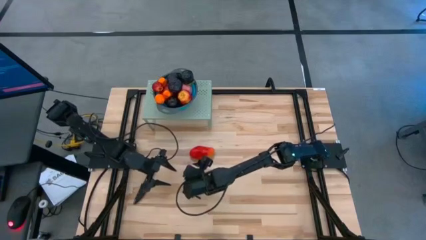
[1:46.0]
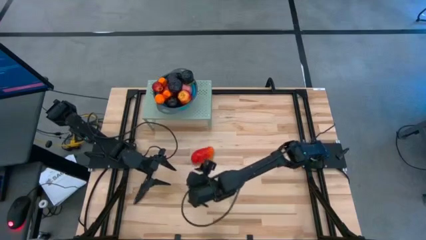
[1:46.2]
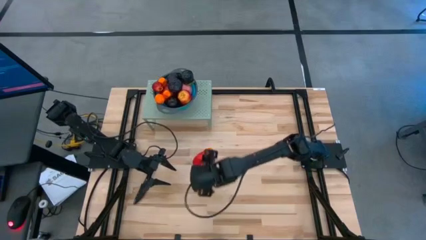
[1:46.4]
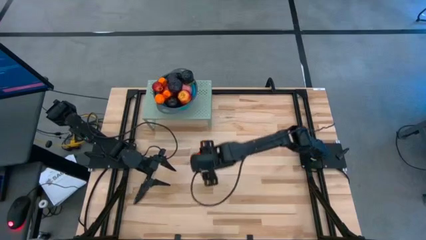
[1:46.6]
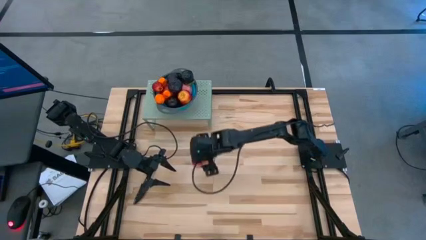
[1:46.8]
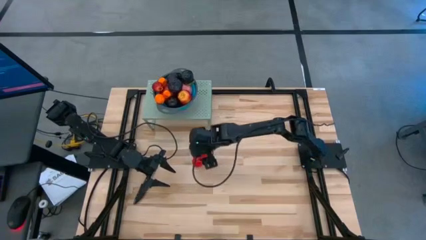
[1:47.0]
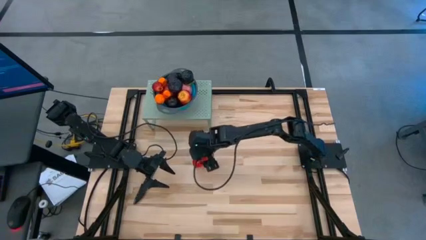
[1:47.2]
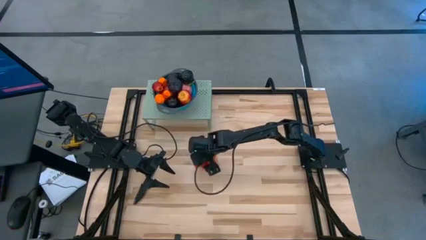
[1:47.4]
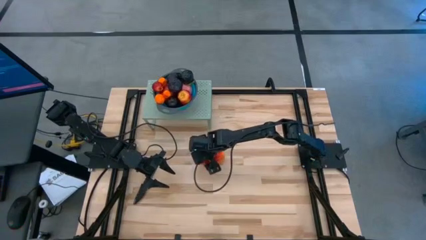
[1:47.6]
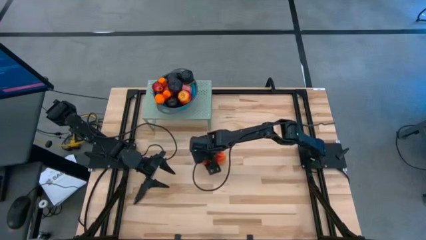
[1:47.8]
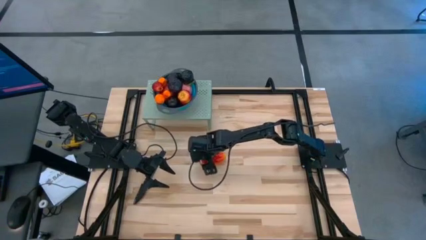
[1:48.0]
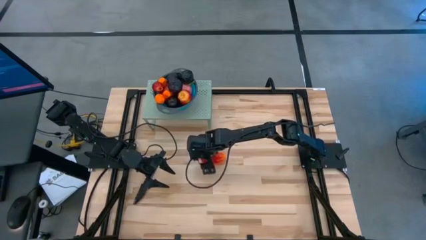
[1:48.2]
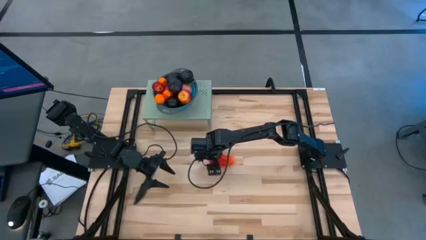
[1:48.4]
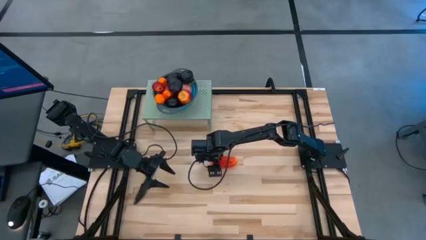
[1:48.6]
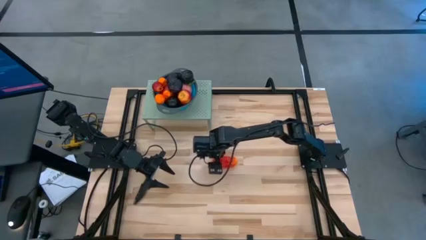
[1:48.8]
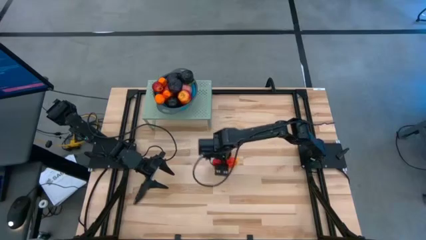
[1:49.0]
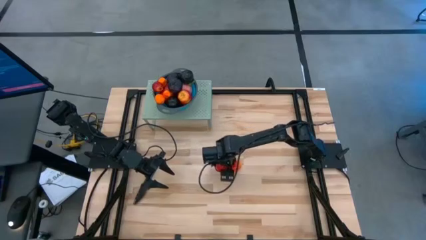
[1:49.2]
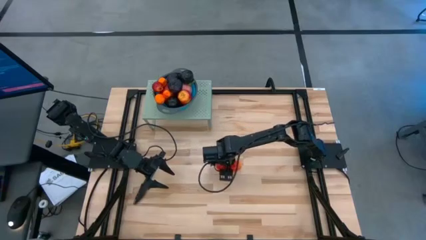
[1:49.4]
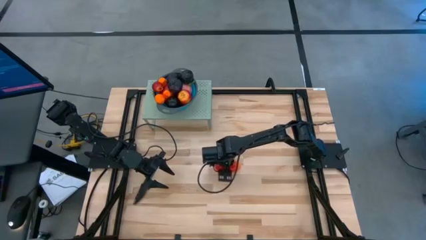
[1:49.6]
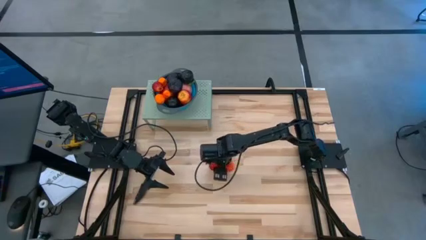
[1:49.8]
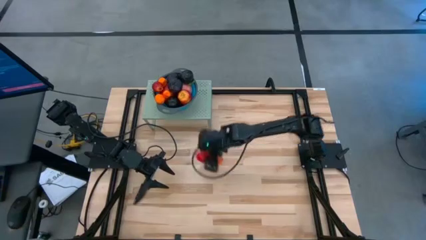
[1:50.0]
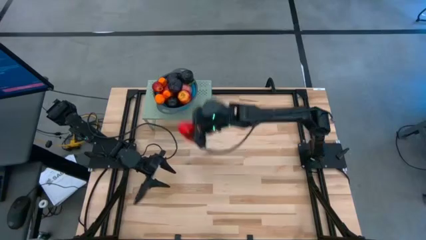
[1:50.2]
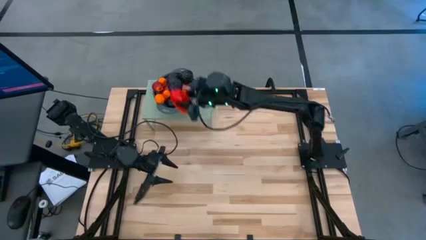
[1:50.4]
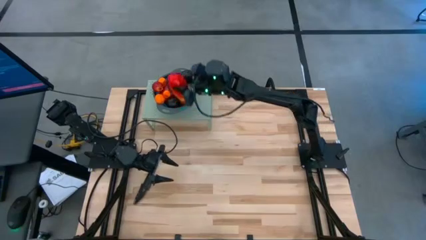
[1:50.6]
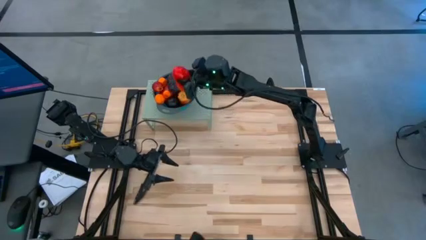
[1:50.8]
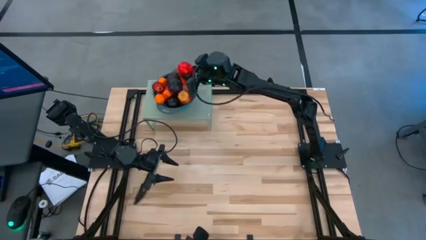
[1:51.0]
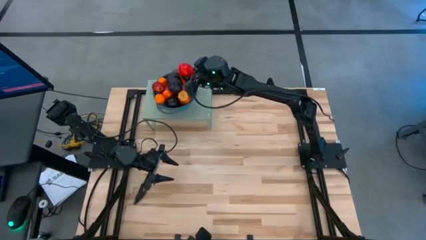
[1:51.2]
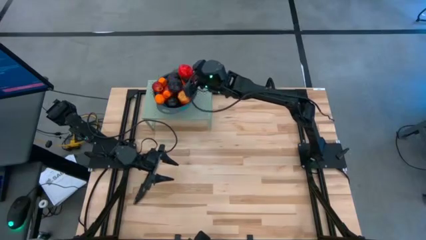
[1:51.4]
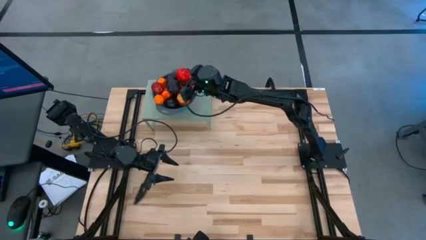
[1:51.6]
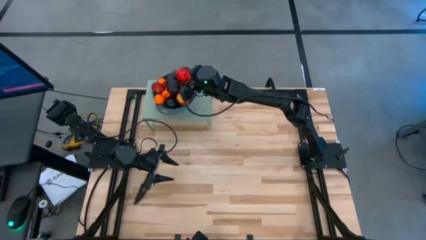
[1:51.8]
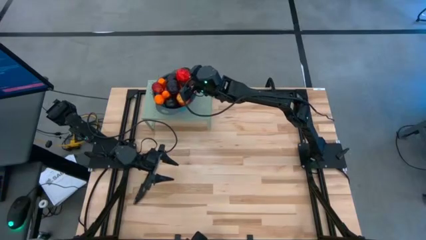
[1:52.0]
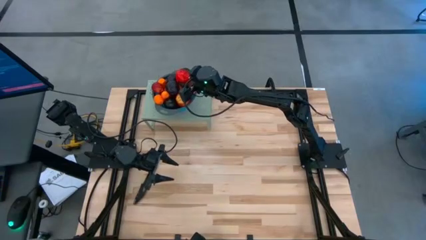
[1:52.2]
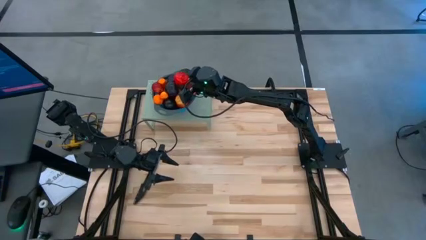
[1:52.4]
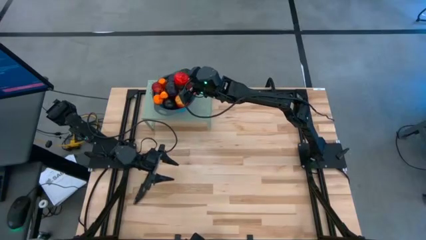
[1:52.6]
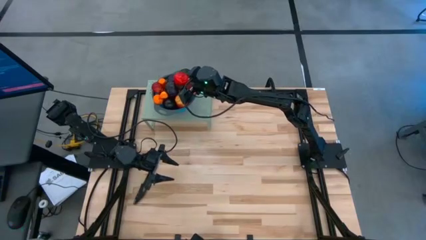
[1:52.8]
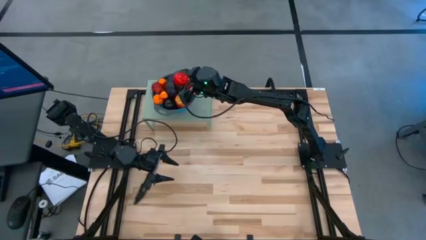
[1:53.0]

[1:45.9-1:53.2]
Task: Pick & Place Fruit
Put the orange mango into the blue strainer bowl on the shelf

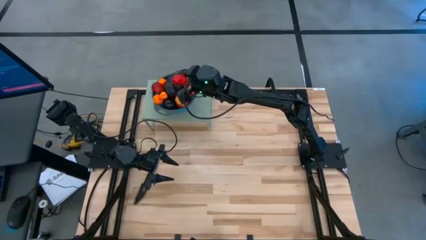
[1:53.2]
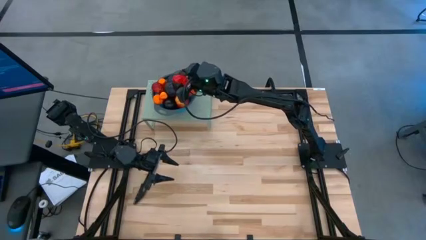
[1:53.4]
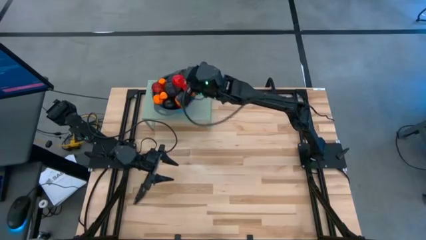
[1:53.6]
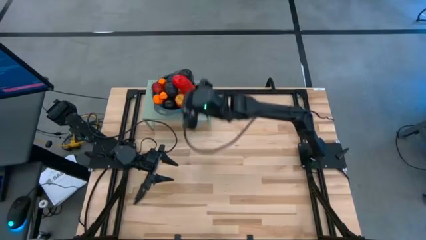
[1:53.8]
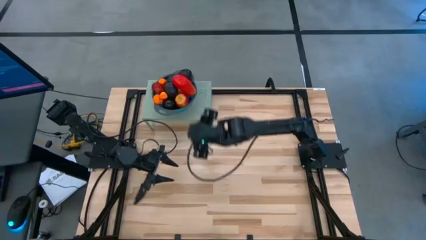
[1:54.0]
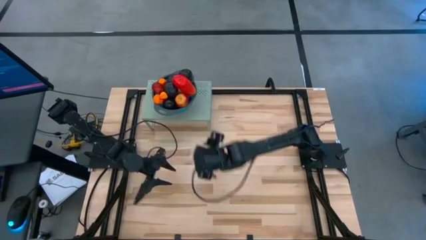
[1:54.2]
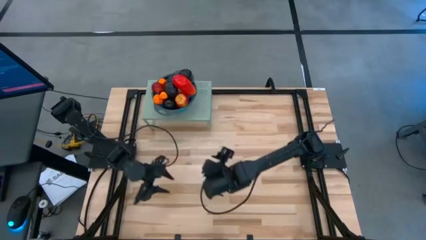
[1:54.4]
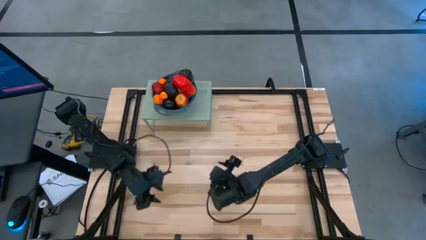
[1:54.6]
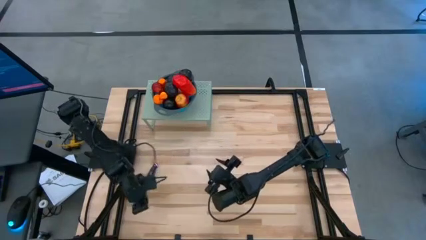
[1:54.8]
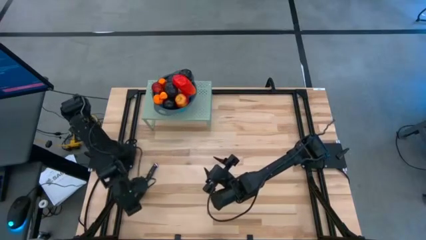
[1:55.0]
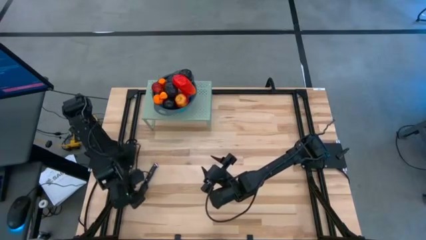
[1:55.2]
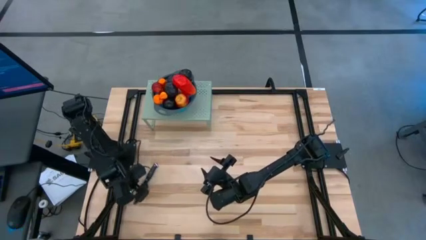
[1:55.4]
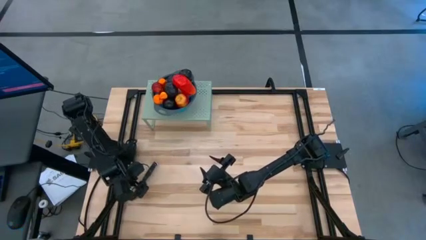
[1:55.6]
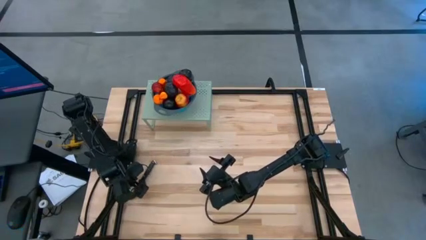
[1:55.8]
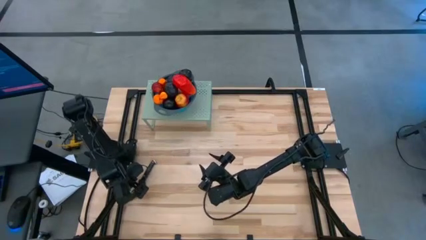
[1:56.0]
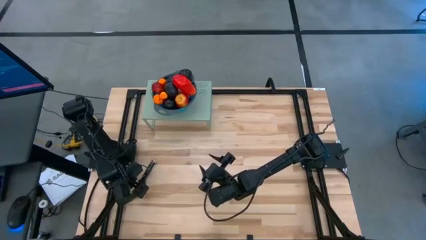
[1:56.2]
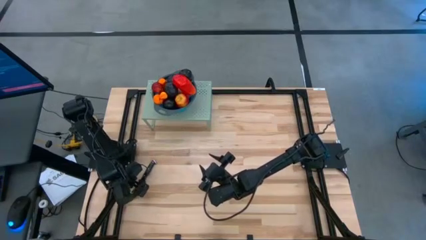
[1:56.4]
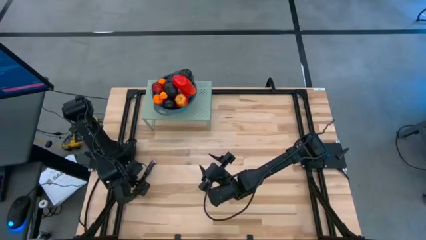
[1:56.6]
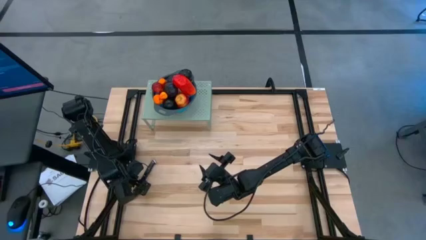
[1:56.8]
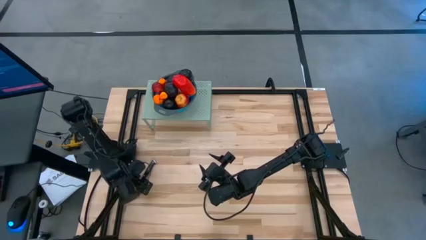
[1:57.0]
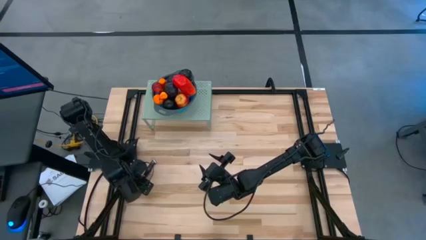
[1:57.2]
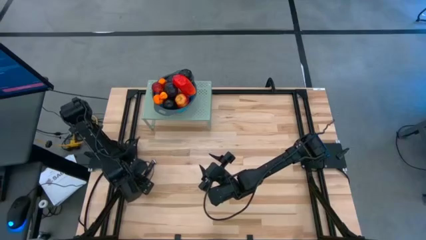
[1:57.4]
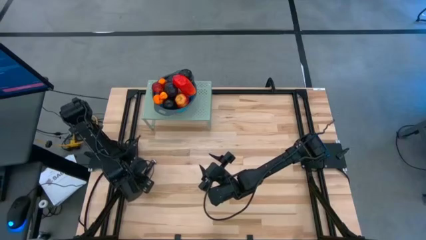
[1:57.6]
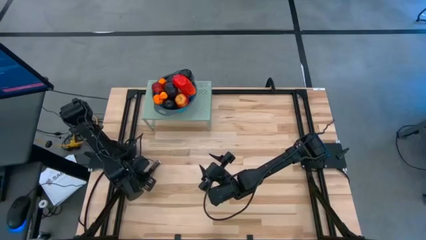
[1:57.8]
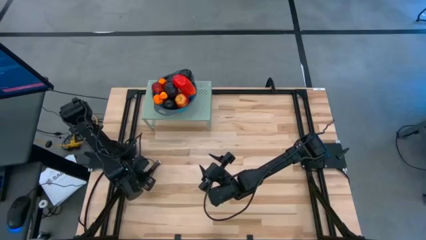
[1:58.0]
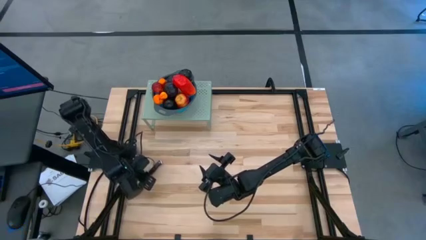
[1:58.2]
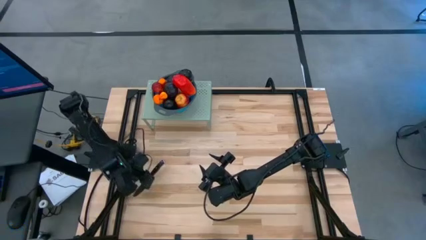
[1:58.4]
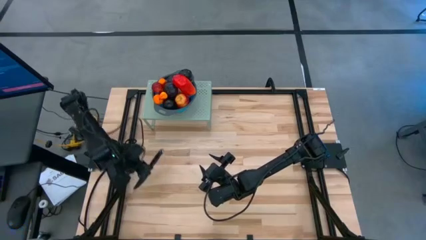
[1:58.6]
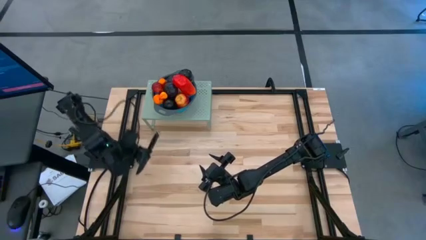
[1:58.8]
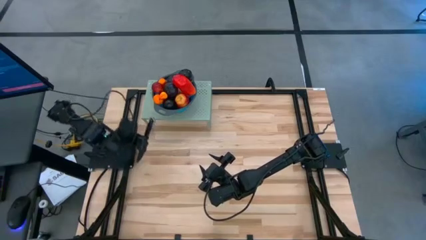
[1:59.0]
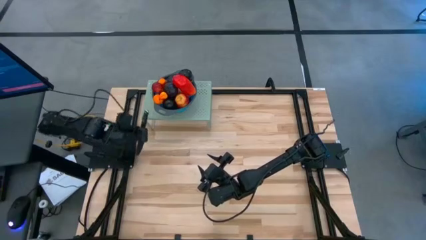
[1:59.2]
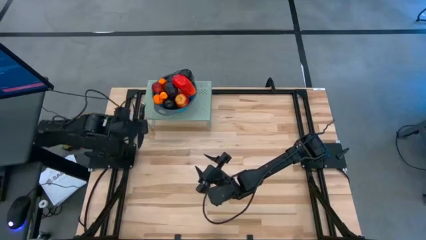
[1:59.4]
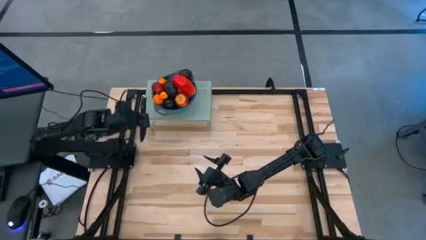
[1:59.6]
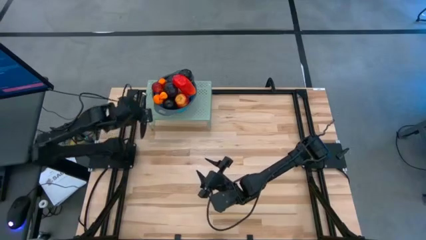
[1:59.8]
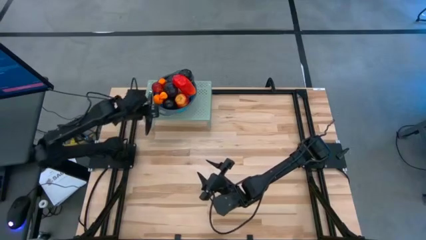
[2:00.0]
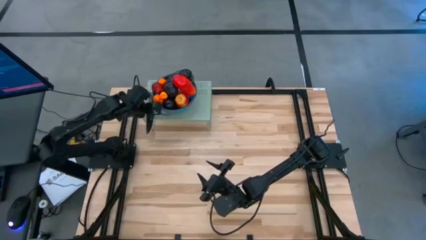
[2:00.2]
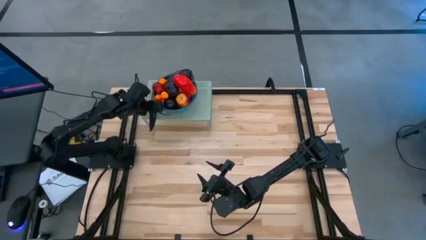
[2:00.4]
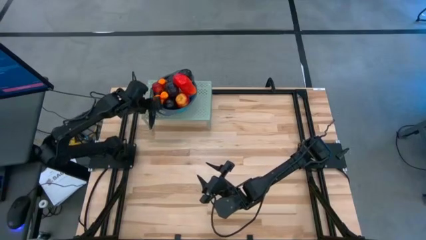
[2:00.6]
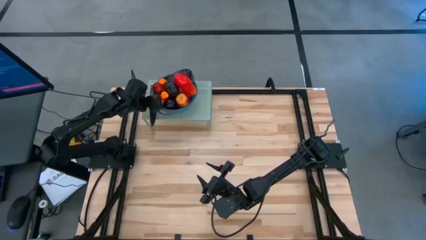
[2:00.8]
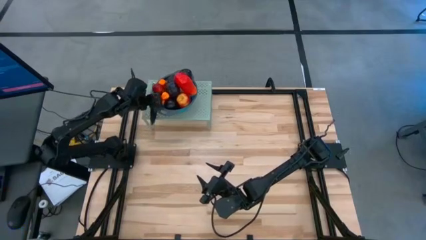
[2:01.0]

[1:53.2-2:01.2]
Put the black knife on the shelf

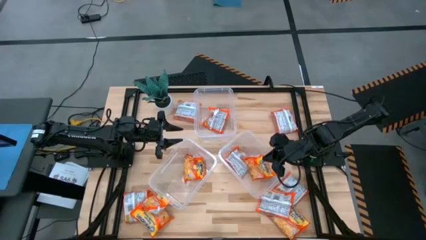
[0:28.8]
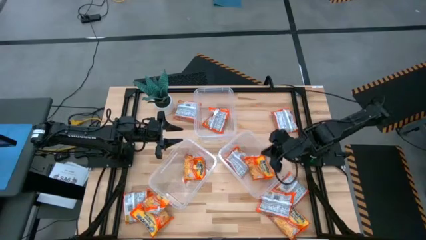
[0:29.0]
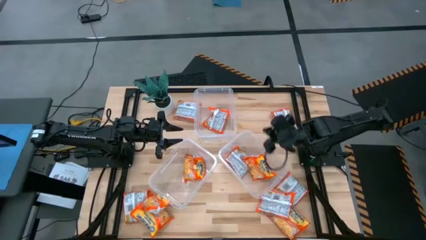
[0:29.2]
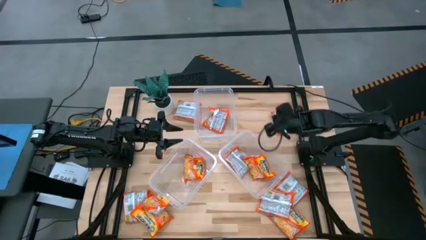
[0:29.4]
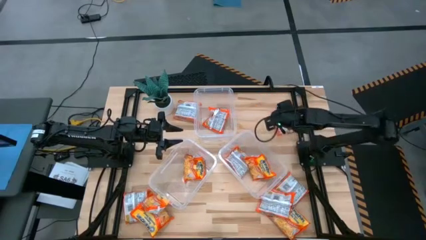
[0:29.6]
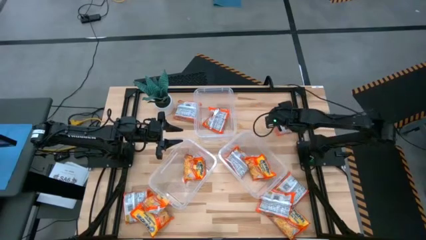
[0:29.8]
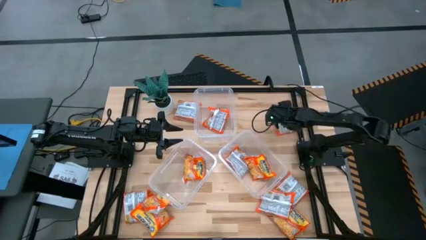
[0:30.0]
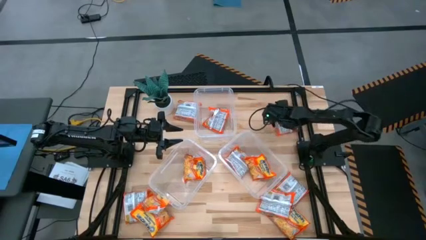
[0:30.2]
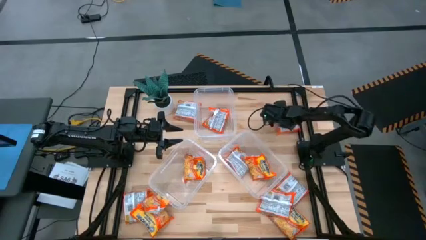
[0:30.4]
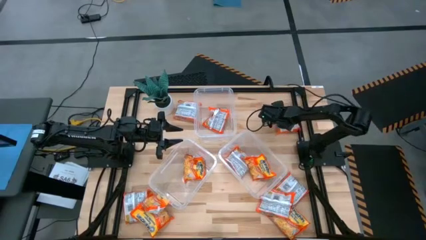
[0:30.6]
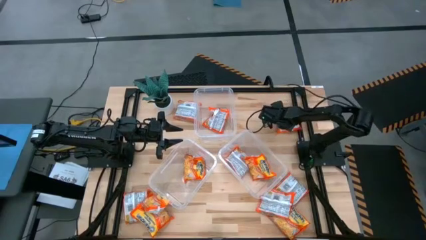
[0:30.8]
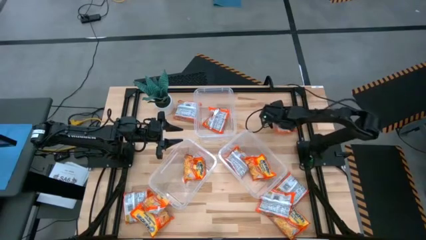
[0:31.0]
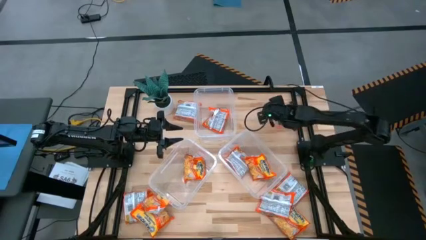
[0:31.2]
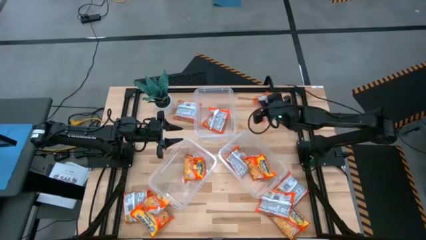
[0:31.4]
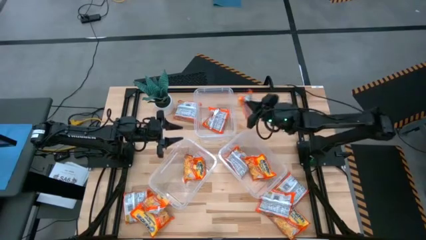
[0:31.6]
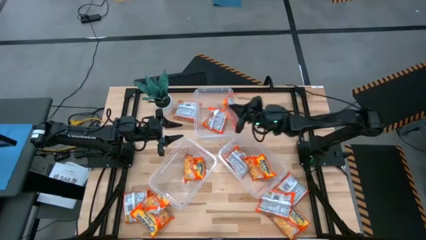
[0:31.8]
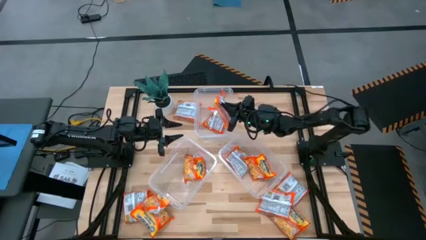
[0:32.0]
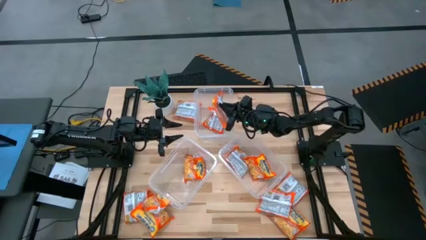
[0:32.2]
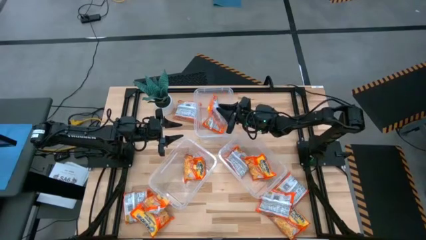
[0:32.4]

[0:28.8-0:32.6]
Task: Sort Maruchan noodles
Put the noodle pack into the top transparent bin
